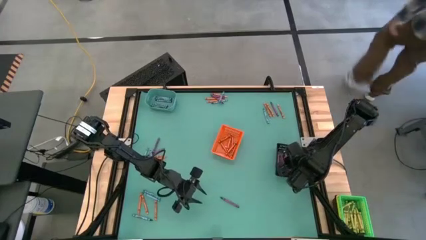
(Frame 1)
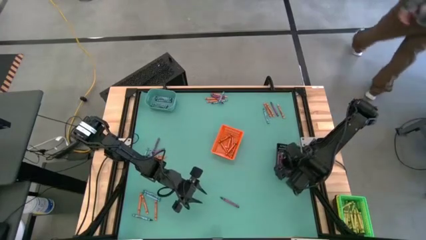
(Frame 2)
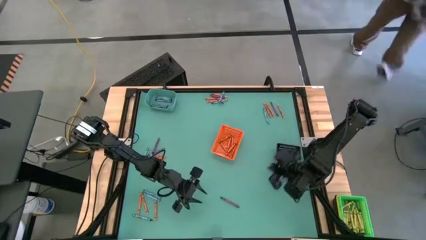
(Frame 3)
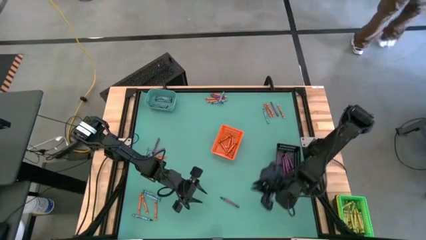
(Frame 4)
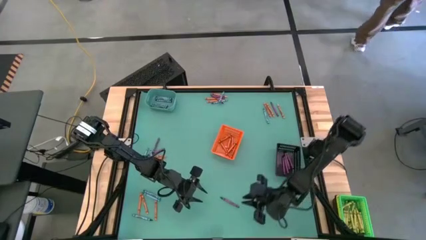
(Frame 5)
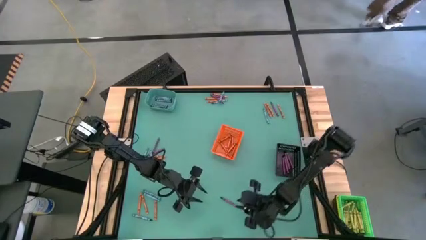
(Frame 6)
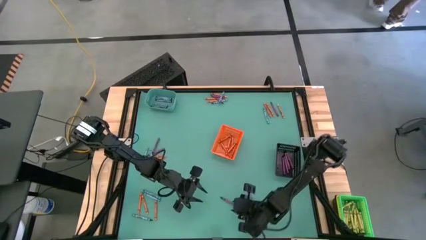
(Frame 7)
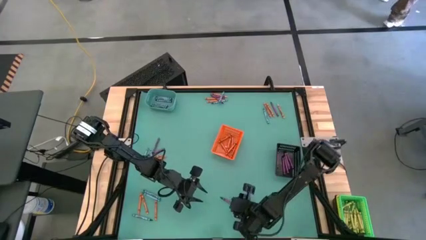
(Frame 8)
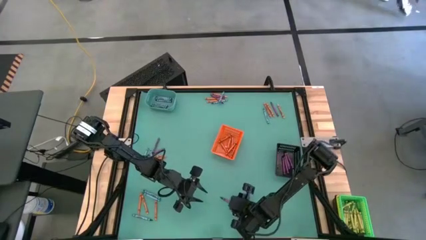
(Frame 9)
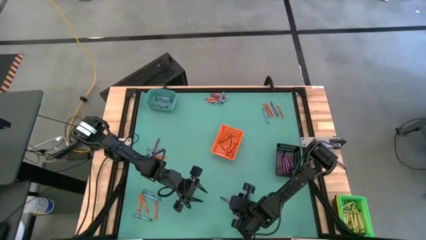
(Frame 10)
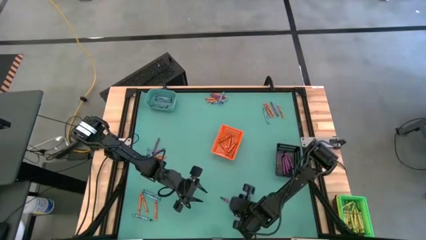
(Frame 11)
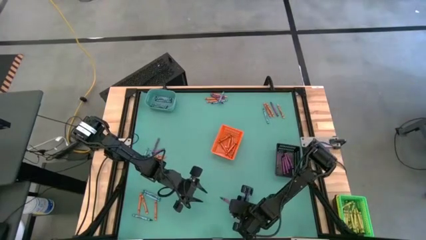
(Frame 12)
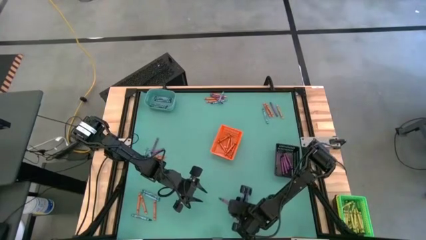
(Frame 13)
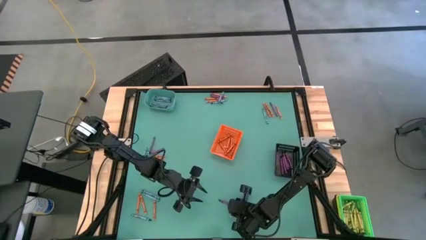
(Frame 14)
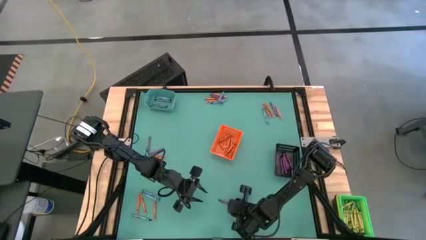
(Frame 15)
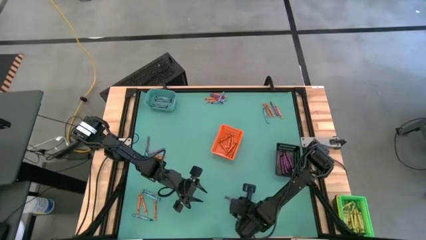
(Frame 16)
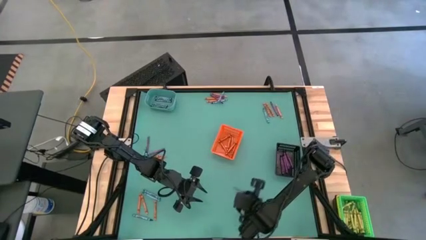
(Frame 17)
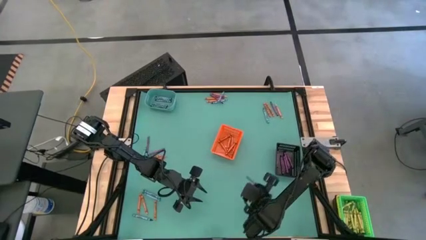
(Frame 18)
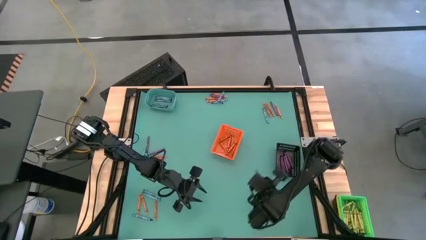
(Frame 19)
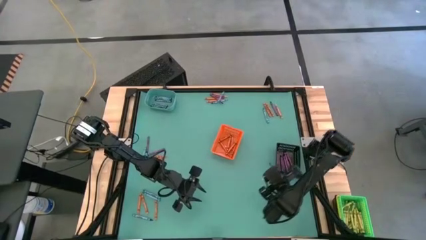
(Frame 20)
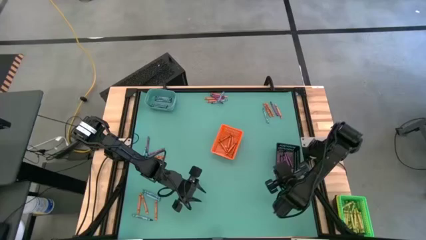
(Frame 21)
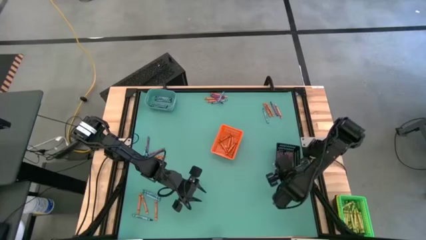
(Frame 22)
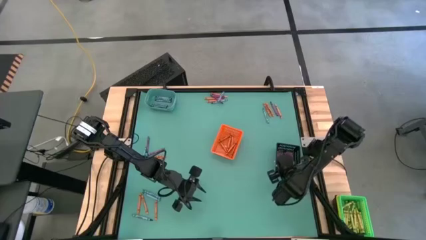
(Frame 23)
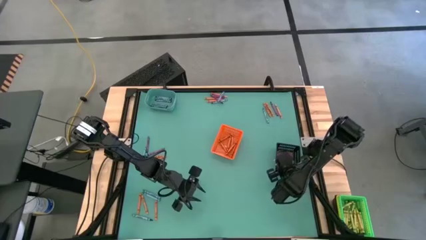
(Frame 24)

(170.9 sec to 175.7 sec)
Task: Sort crayons
Put the violet crayon into black bin

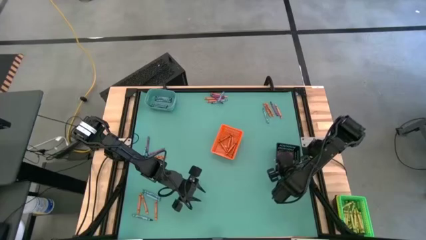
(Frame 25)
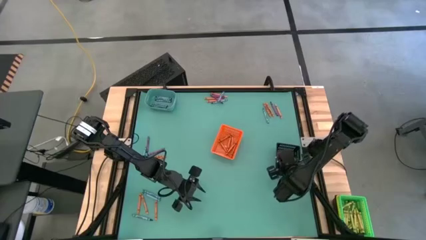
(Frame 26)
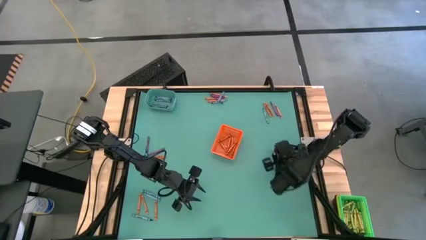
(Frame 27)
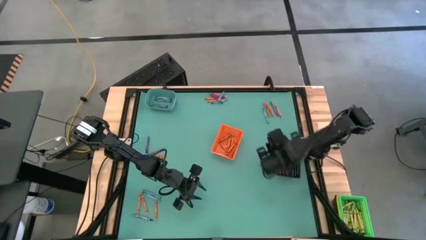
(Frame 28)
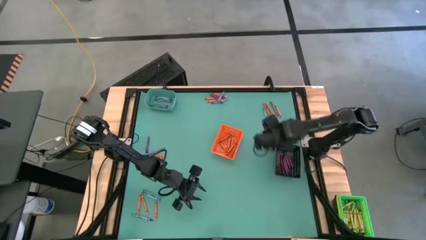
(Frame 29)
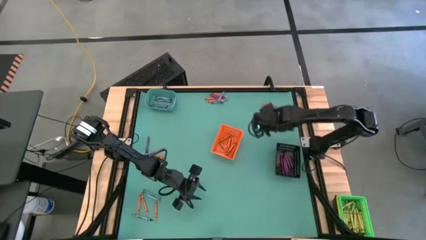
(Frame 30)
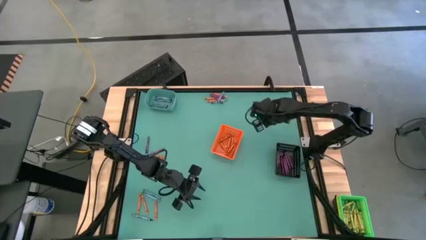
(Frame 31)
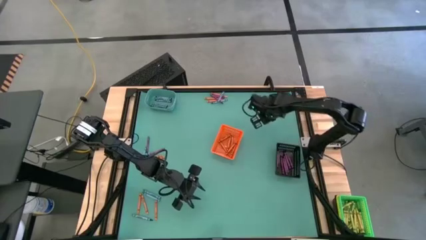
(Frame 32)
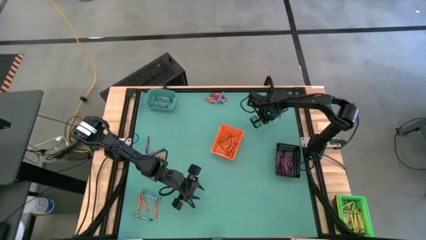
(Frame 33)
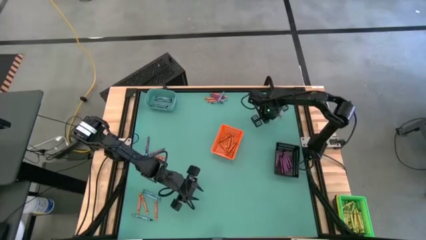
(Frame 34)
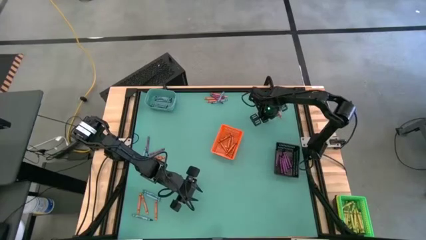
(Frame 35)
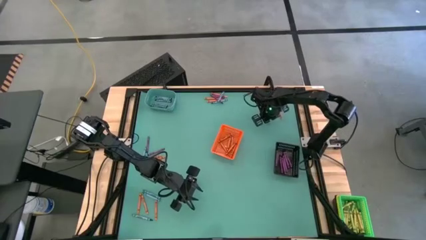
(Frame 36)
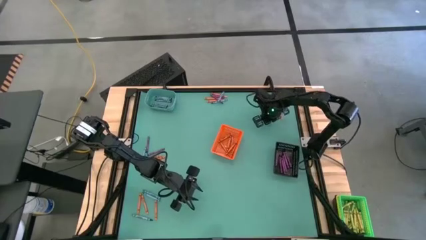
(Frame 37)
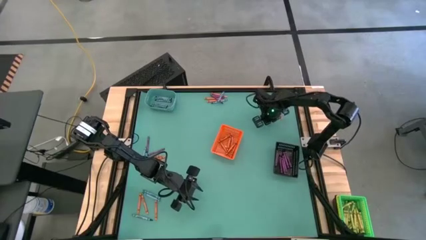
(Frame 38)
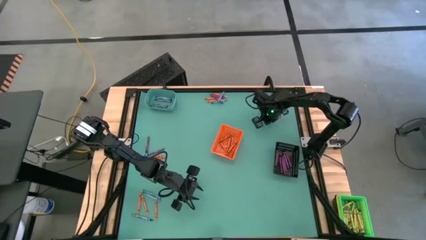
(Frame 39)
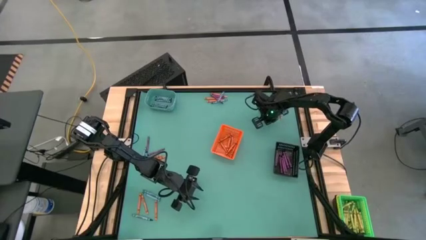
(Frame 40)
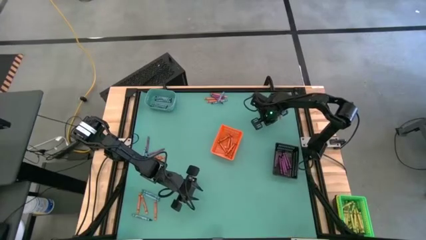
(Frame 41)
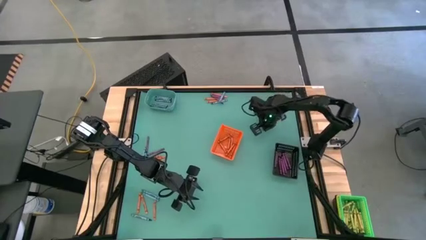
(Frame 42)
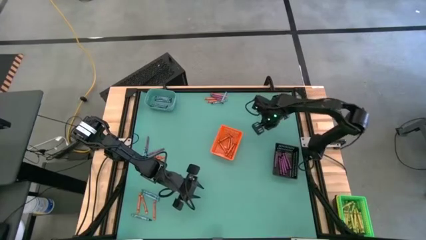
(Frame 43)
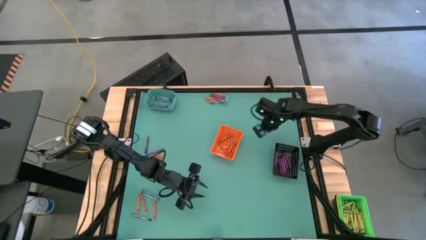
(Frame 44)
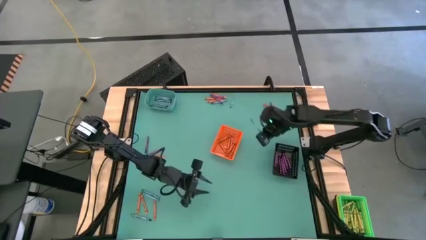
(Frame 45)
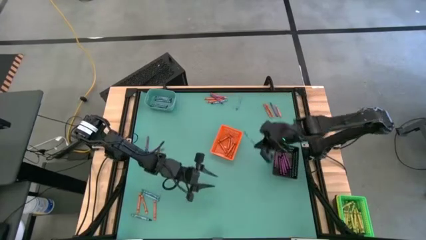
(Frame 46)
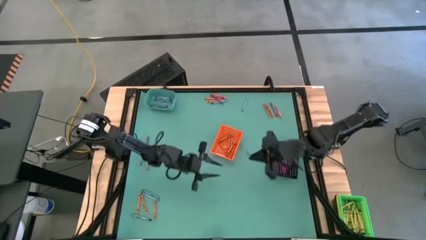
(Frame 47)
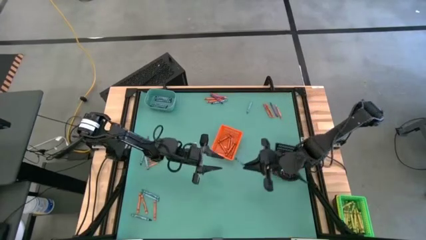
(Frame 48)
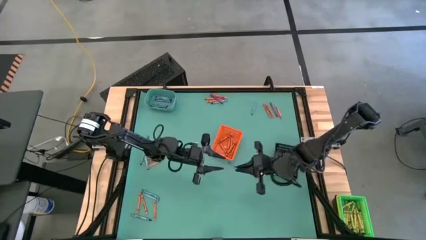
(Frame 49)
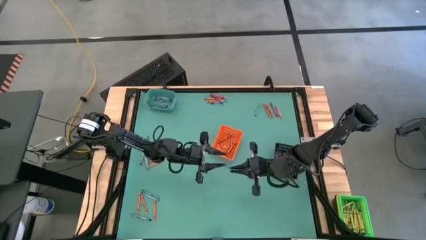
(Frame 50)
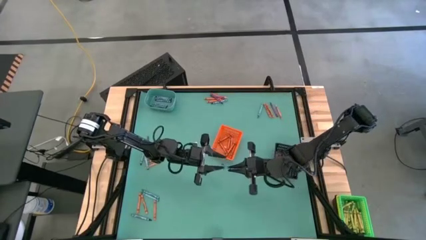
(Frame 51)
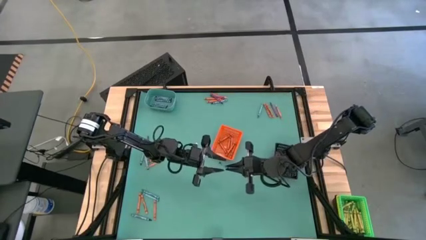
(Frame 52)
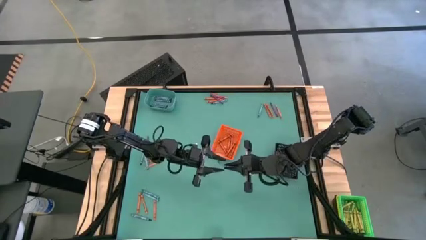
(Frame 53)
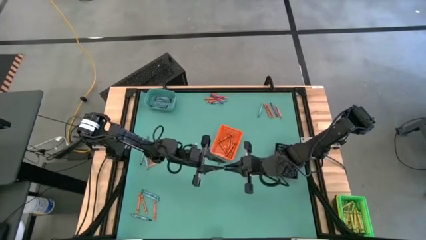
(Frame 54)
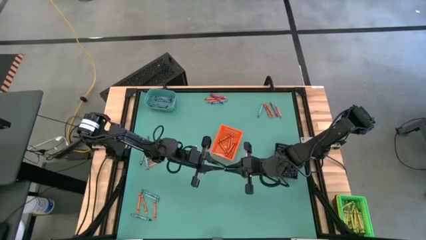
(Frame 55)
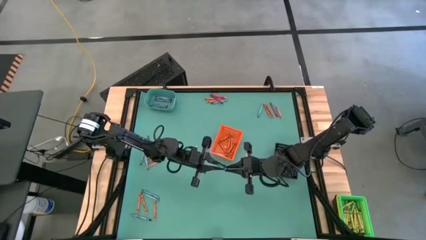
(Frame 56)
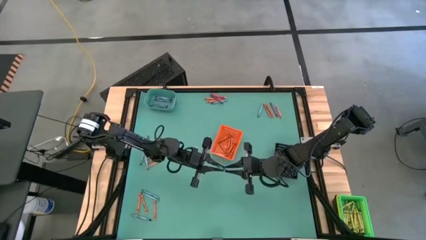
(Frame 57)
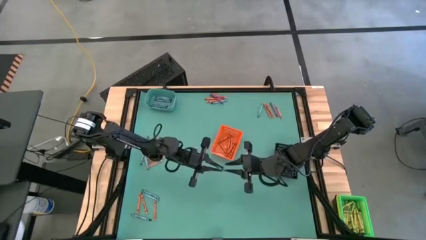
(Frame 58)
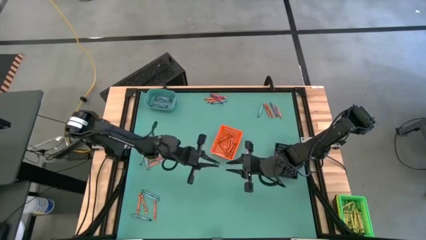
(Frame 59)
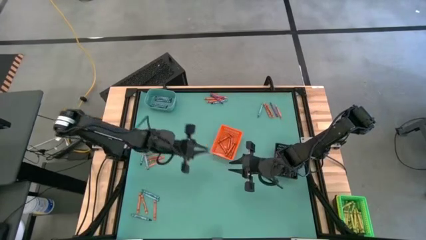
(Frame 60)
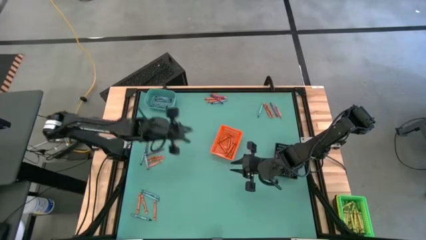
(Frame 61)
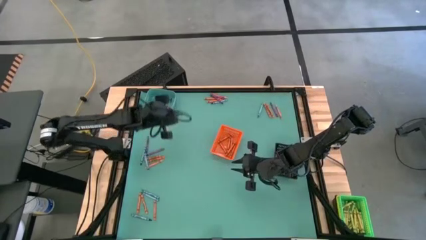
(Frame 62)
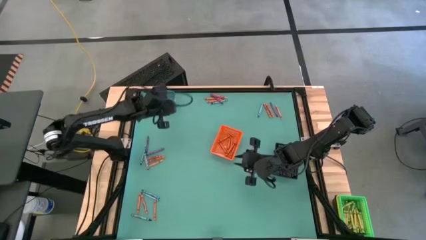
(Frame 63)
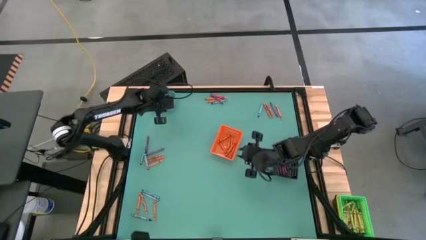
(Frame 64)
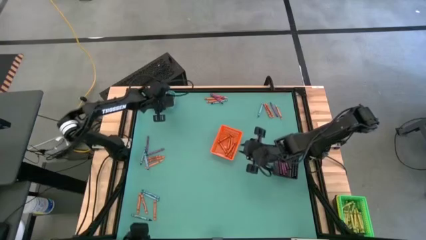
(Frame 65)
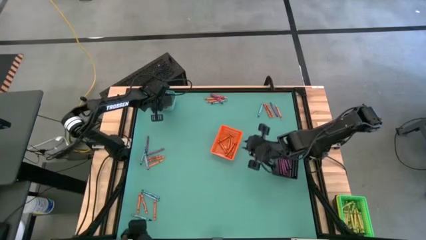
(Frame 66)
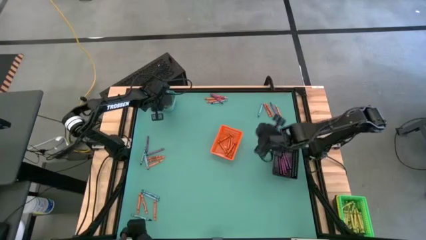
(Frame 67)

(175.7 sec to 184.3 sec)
Put the blue crayon into the blue bin
